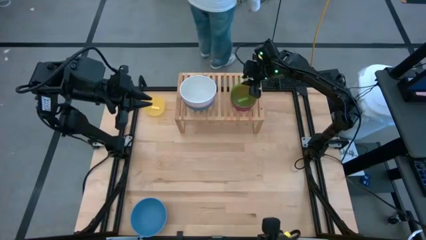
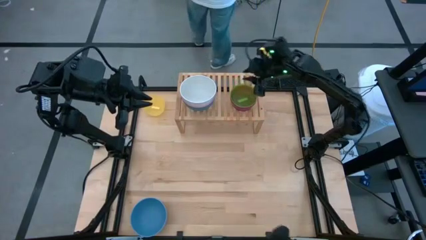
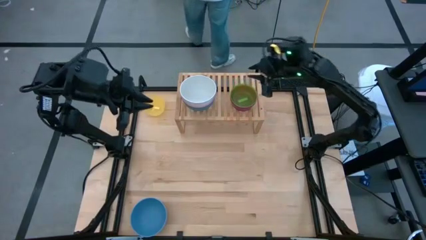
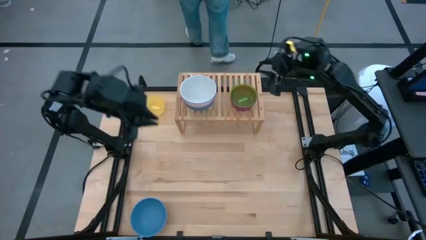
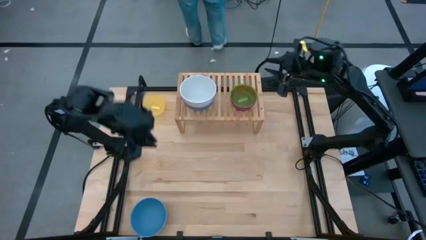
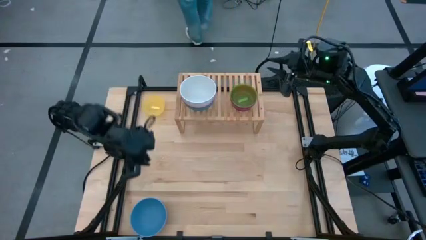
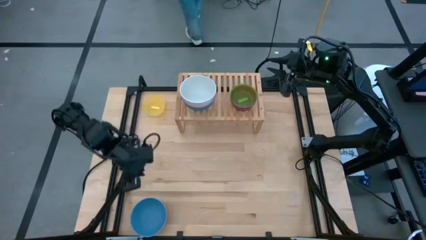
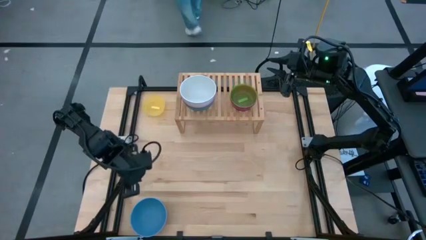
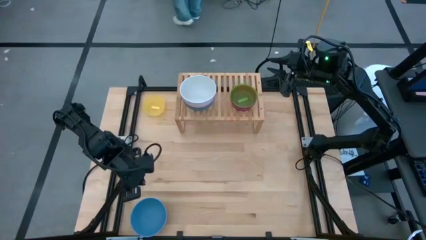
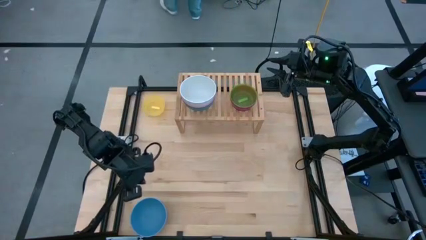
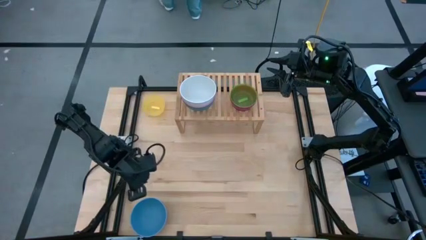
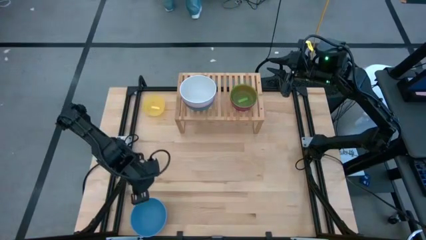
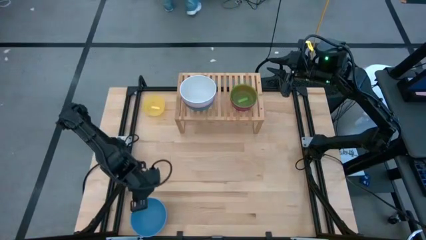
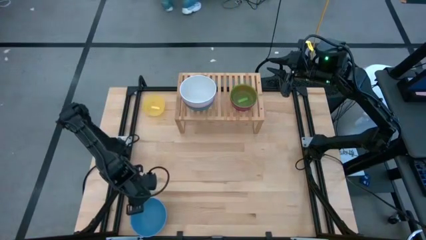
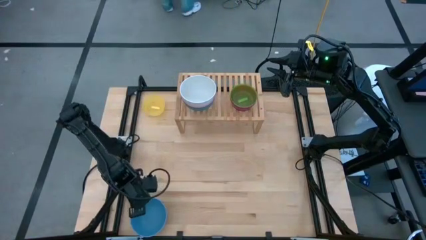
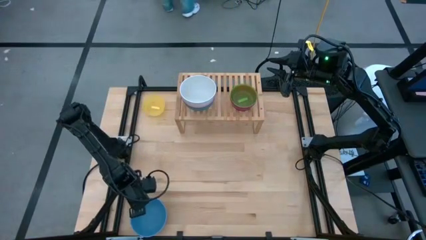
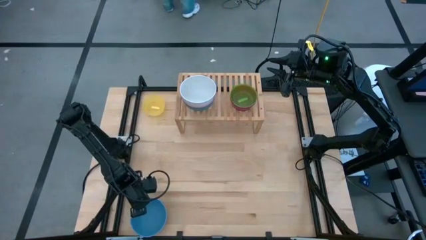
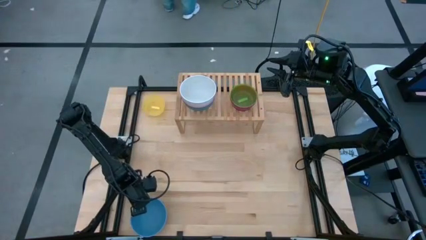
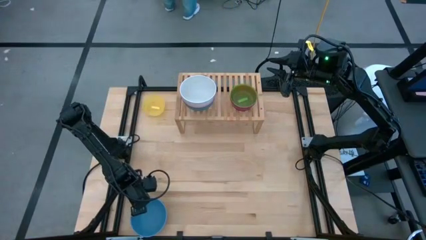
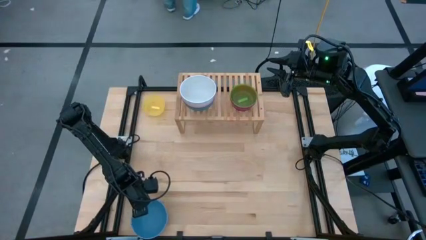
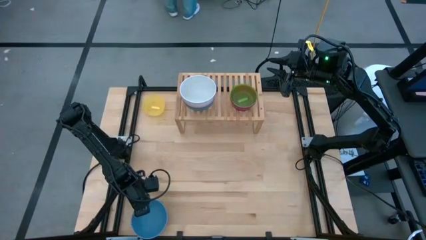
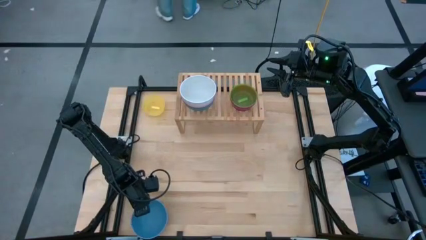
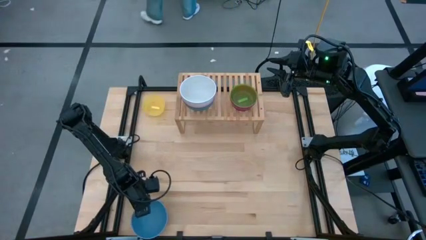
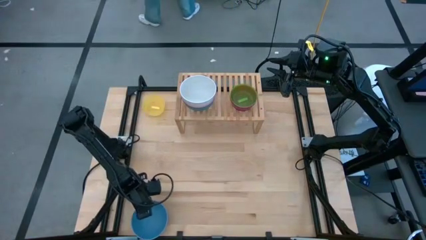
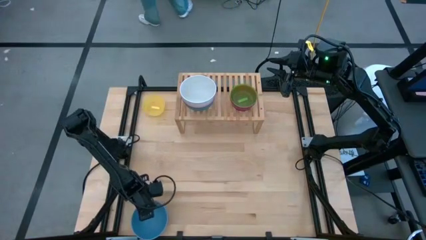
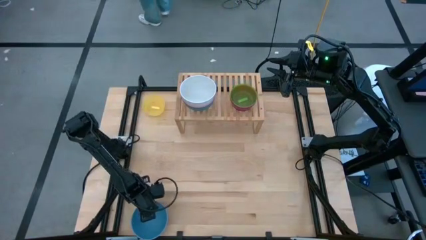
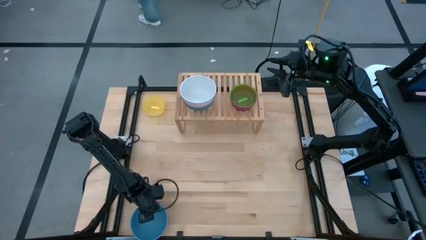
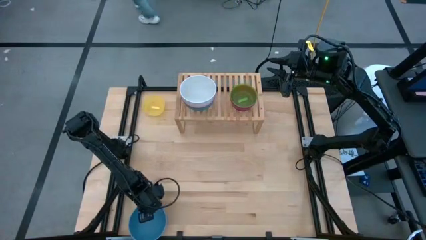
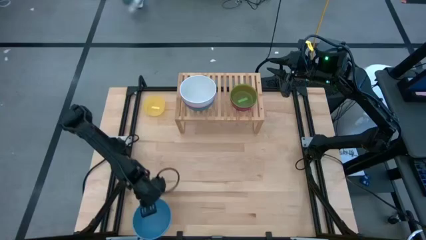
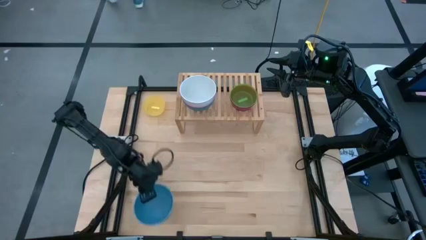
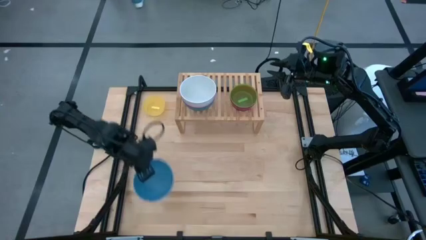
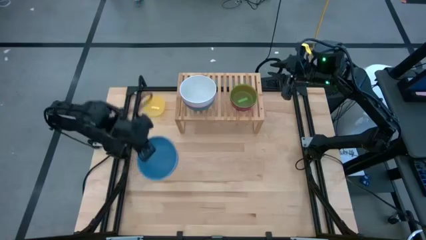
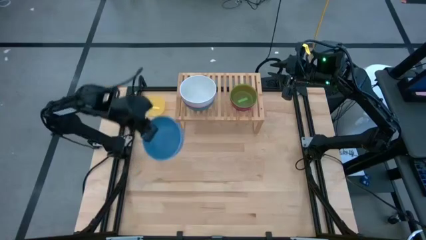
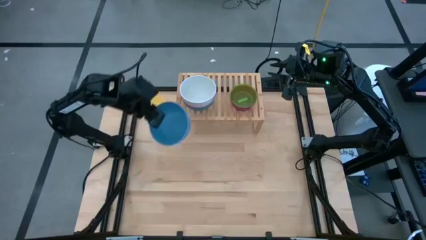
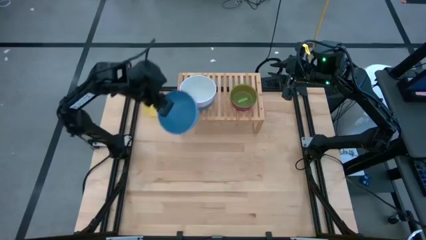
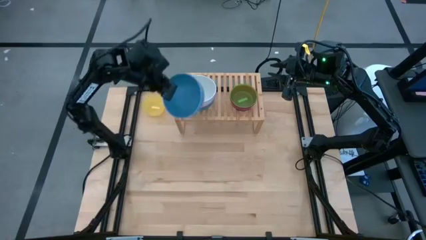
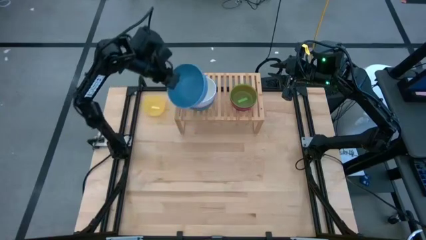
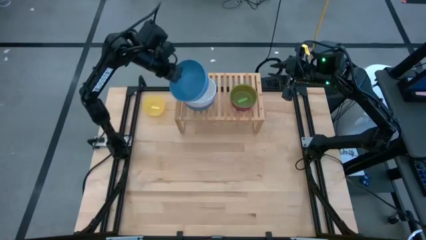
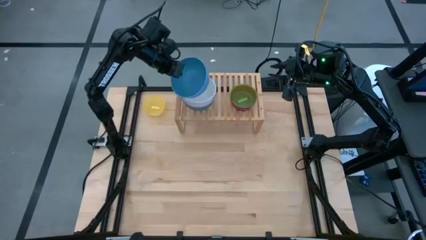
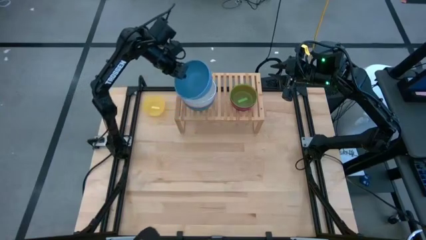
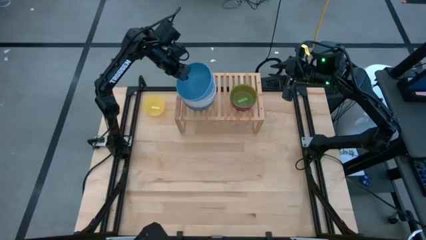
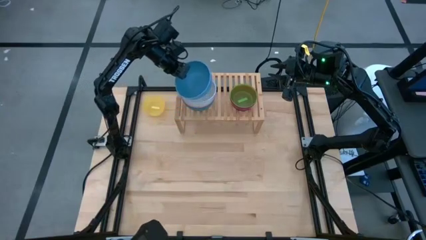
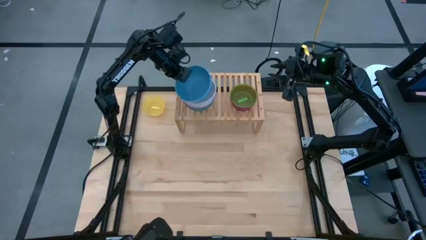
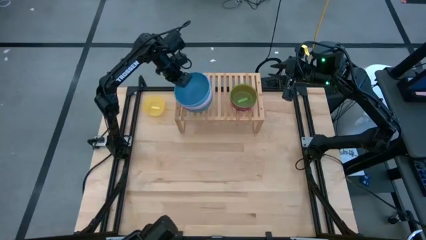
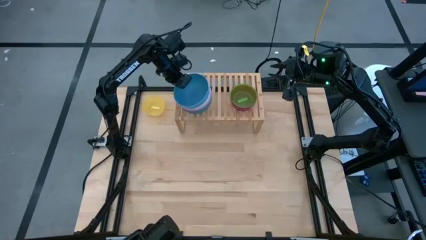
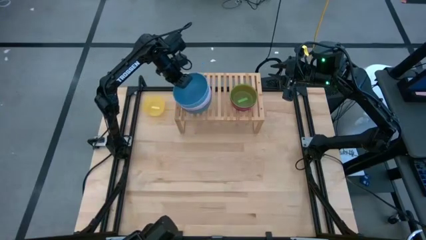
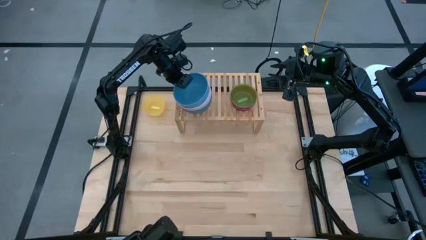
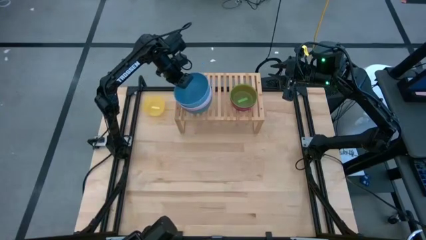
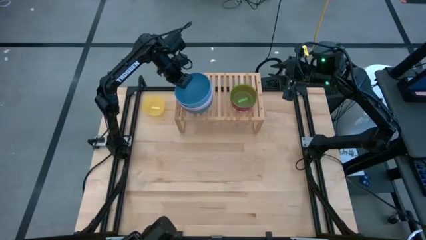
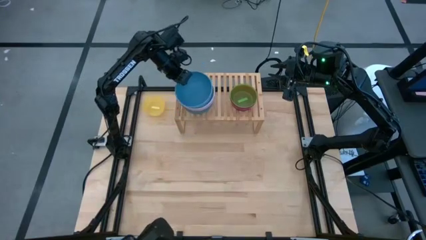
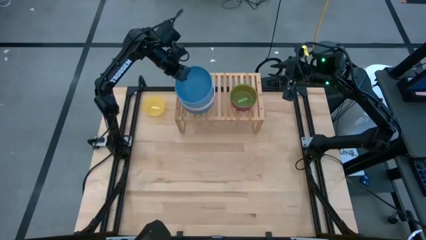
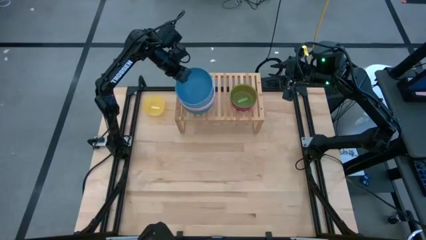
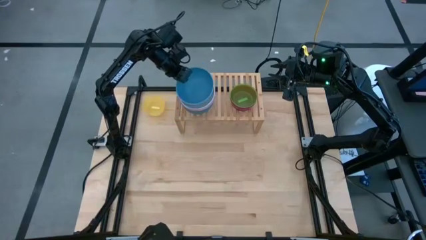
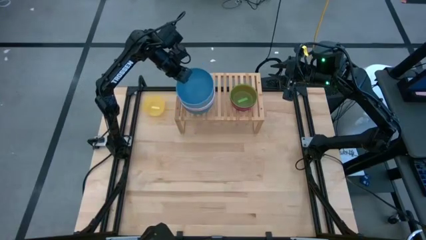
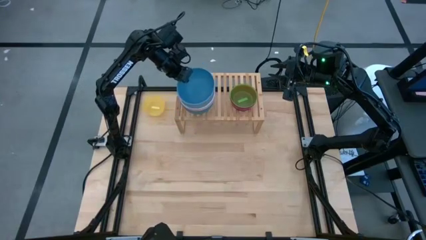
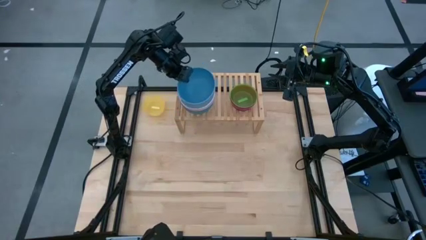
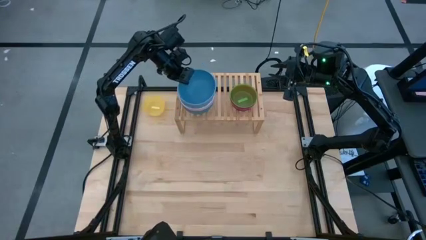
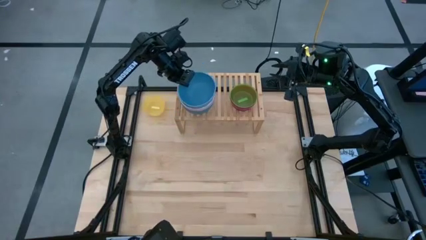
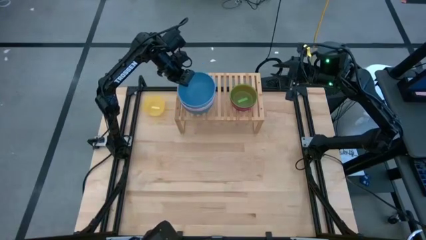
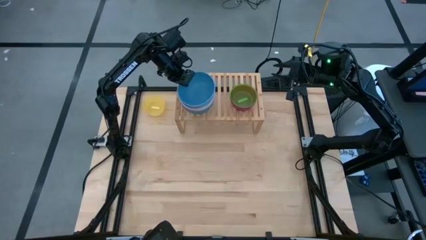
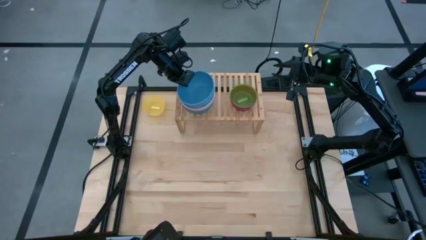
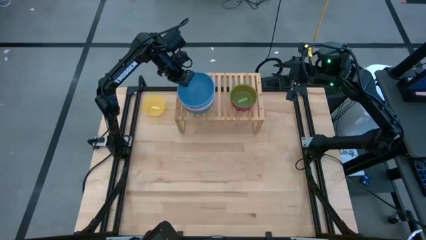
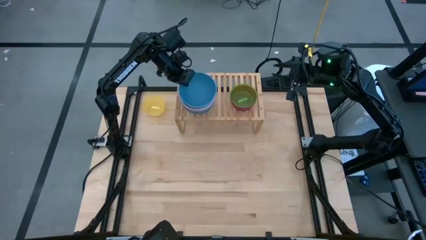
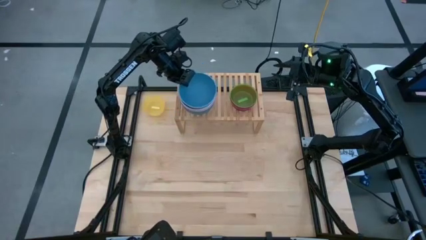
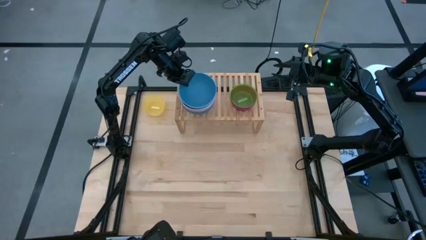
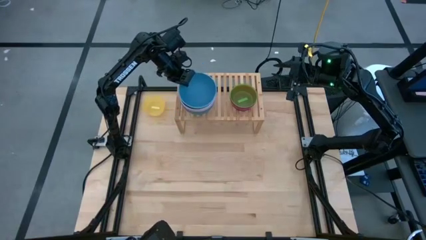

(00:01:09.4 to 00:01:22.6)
Task: Place and stack bowls onto a shelf
Stack the blue bowl on top of the white bowl on the shelf

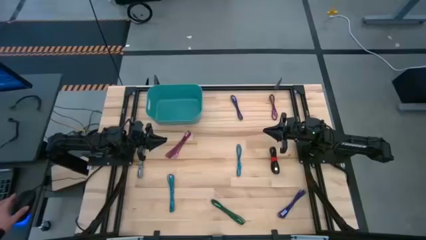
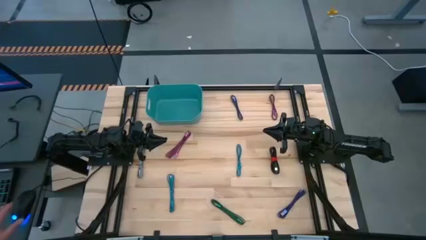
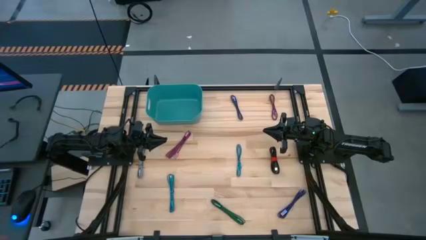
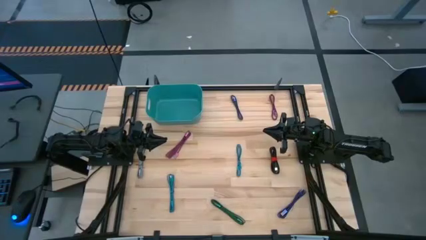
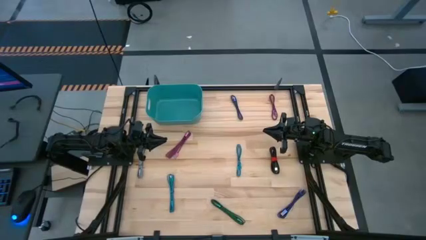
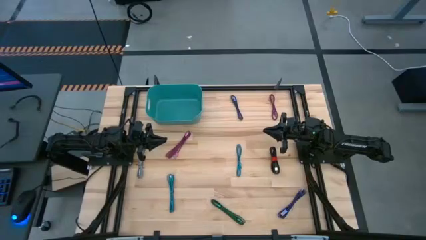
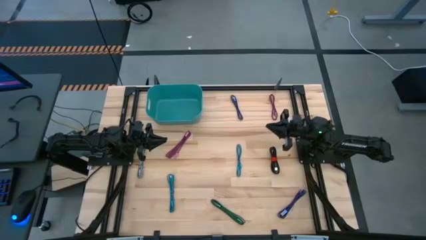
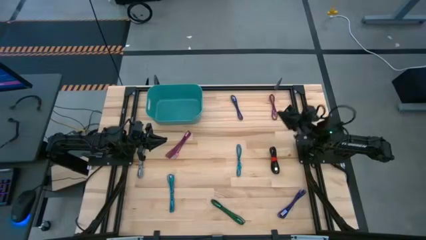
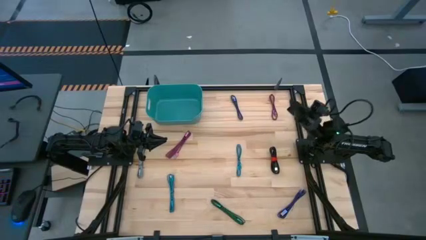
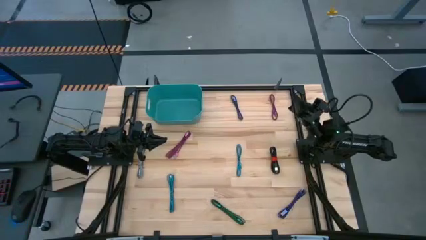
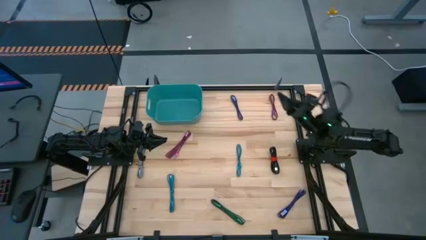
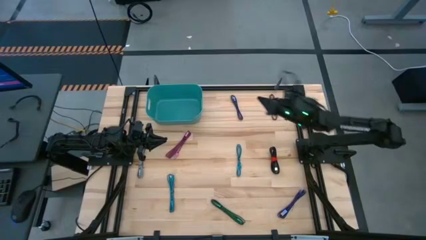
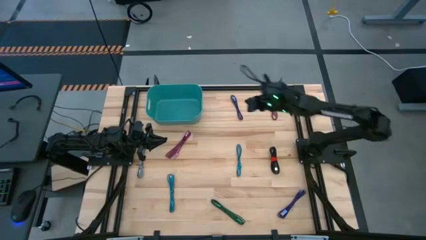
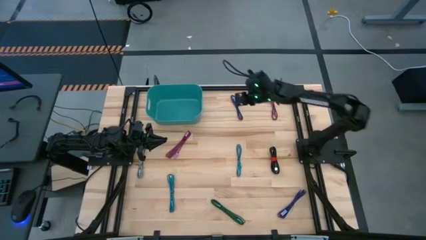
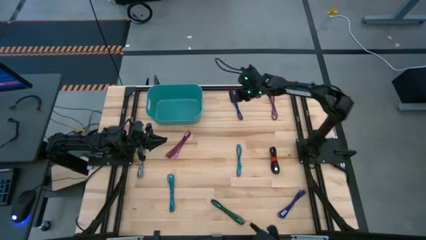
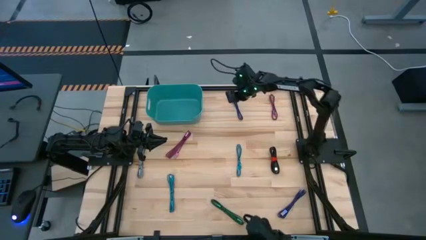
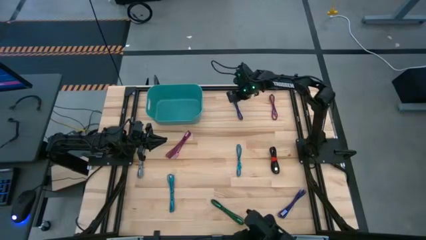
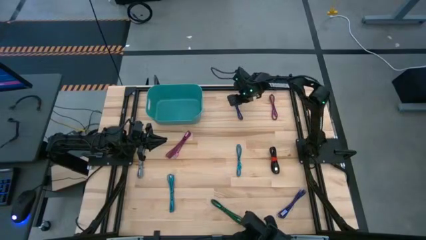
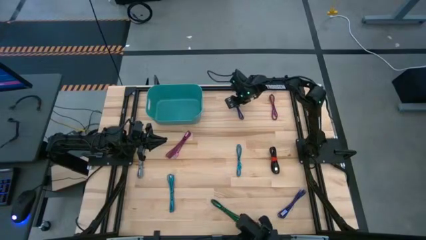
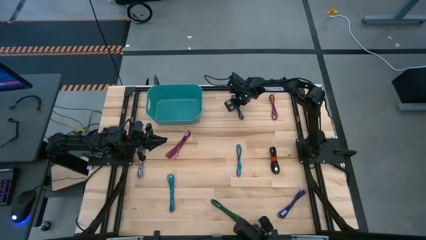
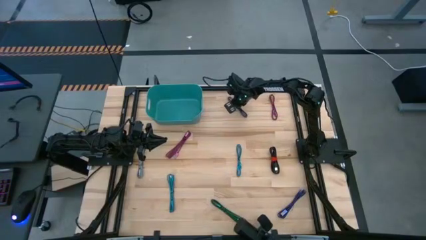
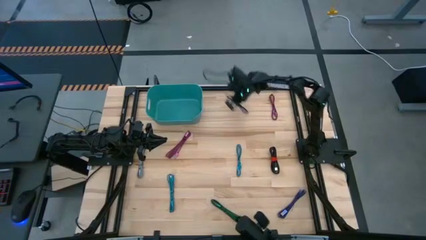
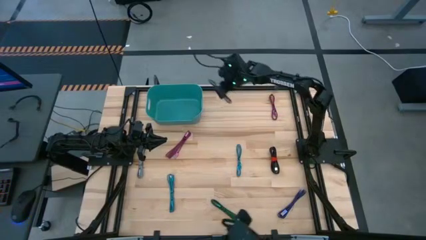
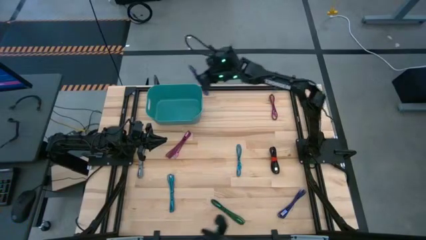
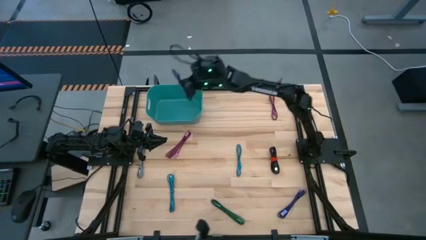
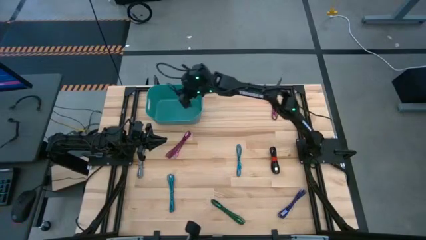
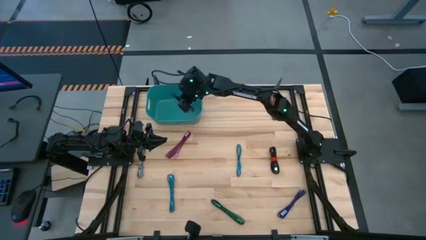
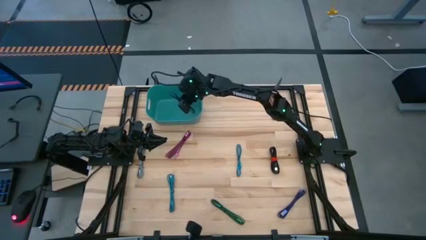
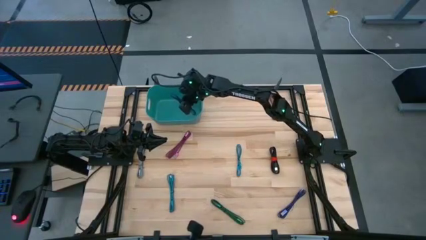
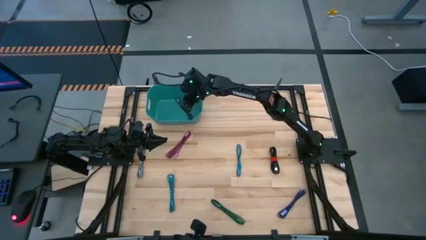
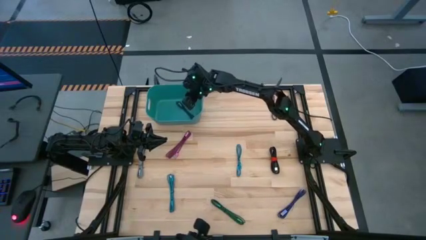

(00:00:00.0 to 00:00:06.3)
Task: Pick and place USB-C Cables
Put the top purple USB charger cable into the green bin
